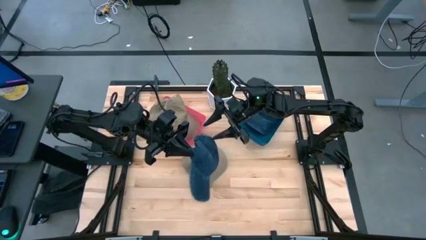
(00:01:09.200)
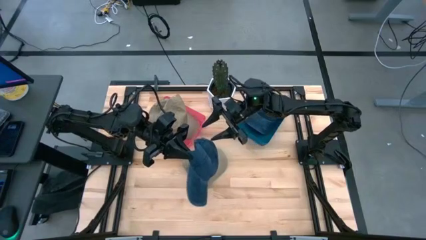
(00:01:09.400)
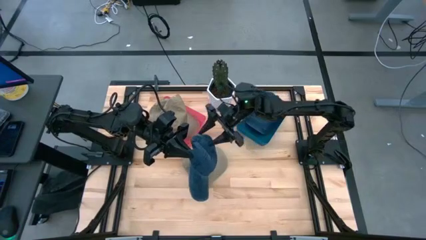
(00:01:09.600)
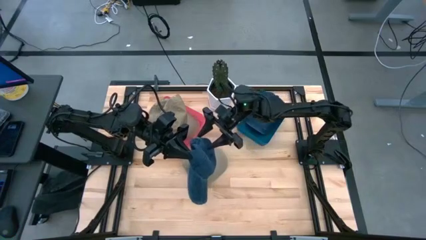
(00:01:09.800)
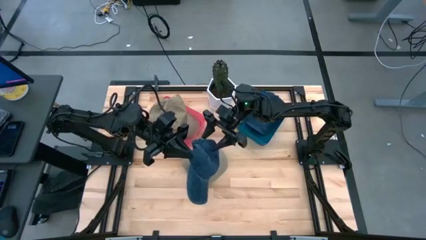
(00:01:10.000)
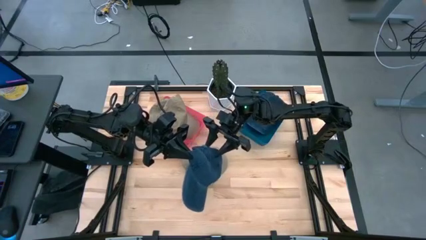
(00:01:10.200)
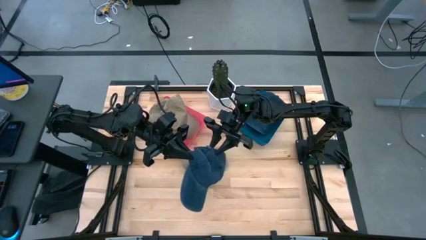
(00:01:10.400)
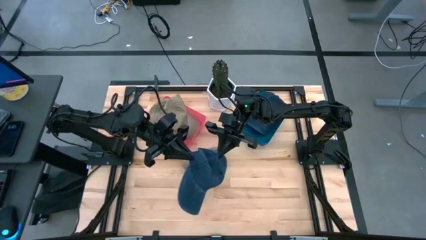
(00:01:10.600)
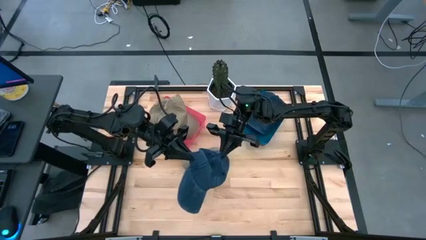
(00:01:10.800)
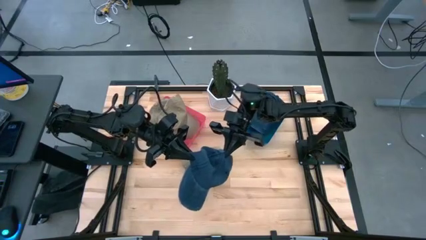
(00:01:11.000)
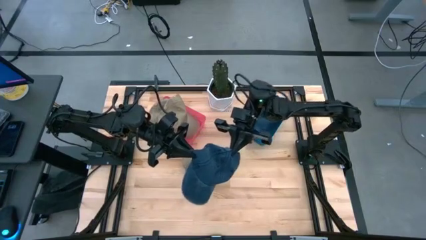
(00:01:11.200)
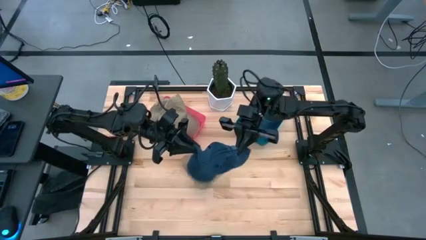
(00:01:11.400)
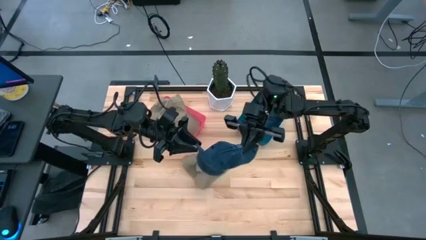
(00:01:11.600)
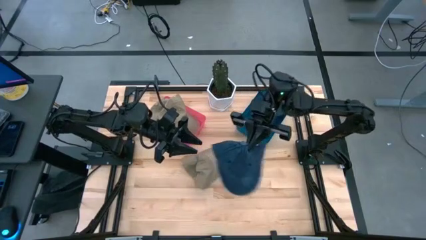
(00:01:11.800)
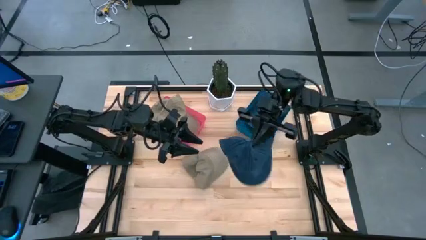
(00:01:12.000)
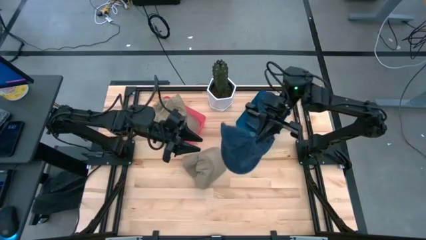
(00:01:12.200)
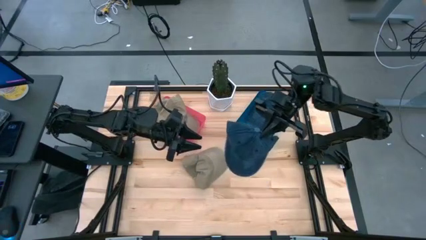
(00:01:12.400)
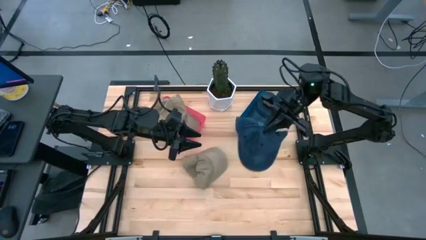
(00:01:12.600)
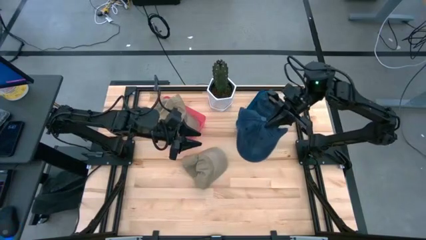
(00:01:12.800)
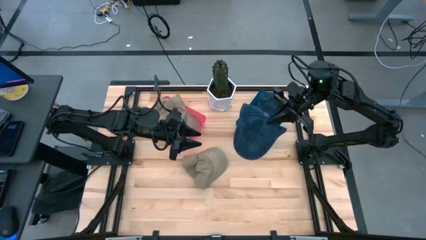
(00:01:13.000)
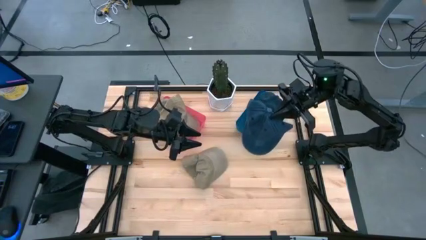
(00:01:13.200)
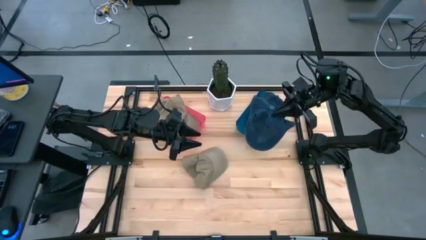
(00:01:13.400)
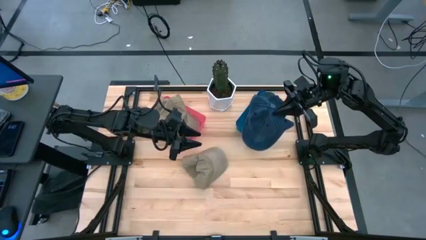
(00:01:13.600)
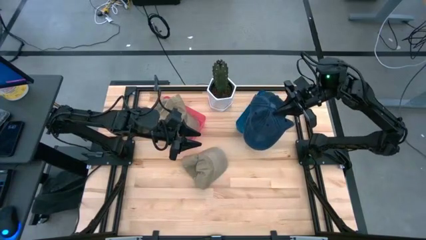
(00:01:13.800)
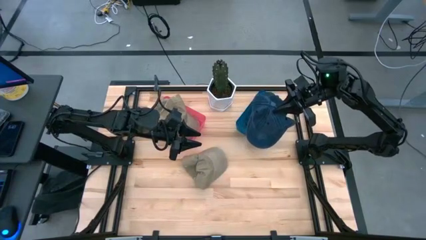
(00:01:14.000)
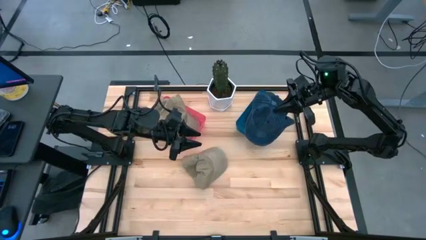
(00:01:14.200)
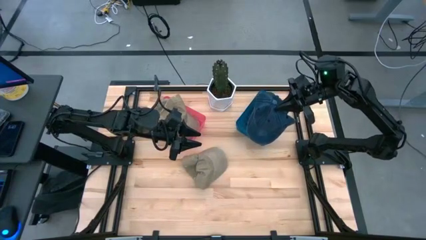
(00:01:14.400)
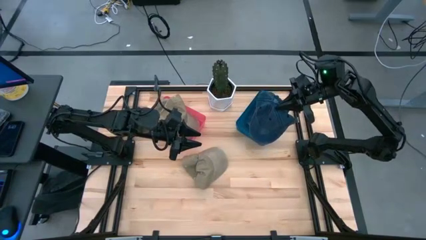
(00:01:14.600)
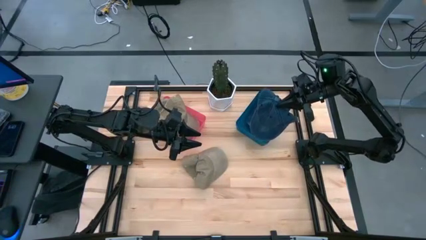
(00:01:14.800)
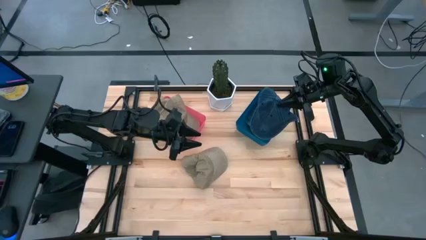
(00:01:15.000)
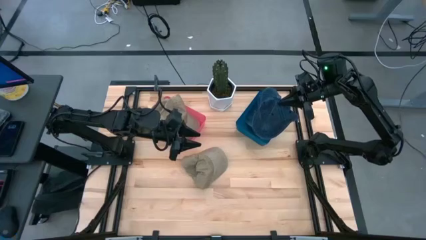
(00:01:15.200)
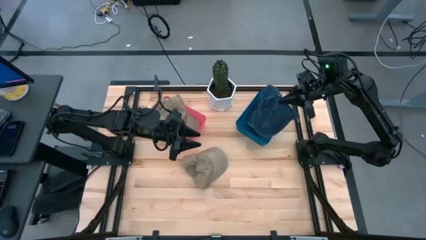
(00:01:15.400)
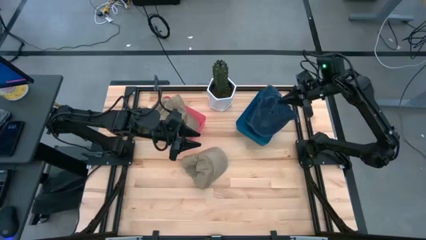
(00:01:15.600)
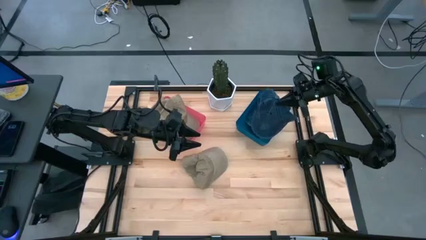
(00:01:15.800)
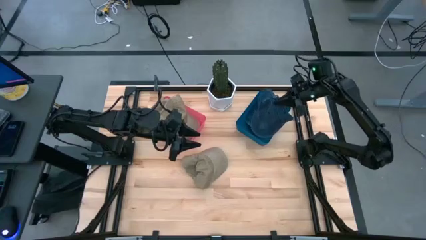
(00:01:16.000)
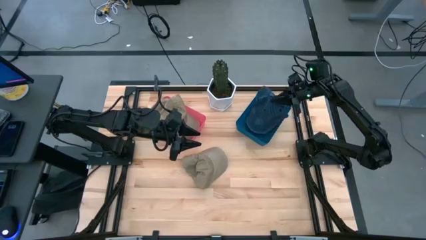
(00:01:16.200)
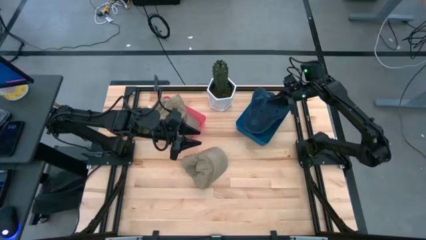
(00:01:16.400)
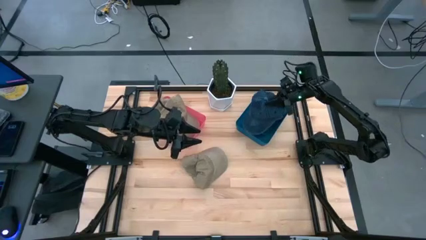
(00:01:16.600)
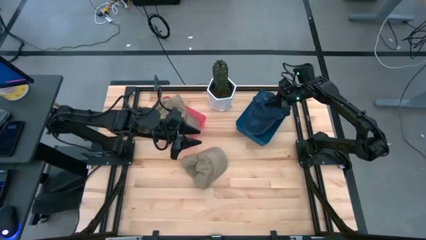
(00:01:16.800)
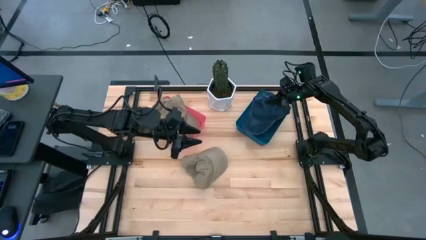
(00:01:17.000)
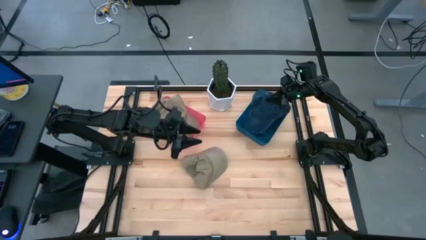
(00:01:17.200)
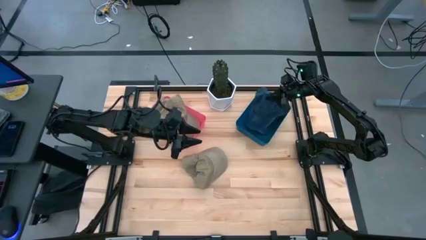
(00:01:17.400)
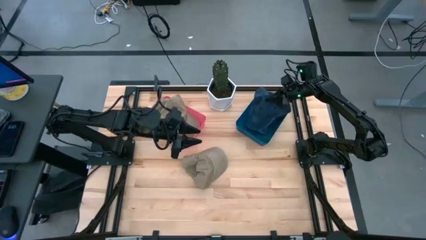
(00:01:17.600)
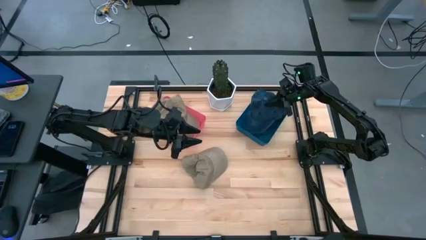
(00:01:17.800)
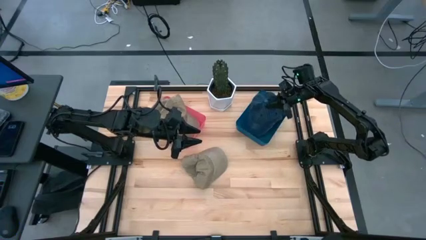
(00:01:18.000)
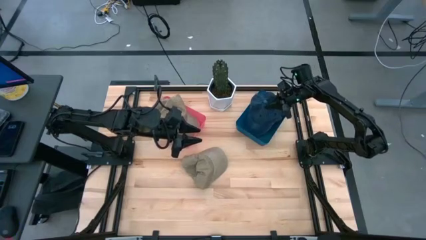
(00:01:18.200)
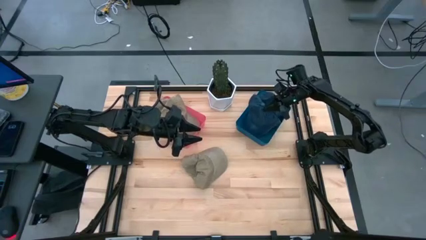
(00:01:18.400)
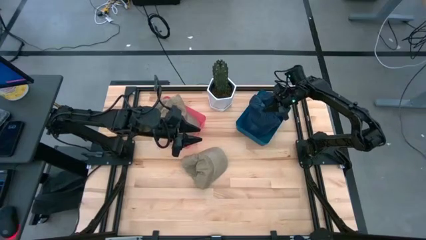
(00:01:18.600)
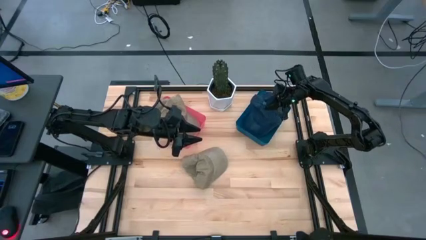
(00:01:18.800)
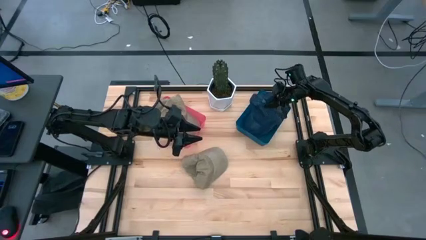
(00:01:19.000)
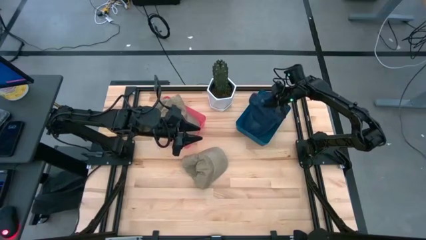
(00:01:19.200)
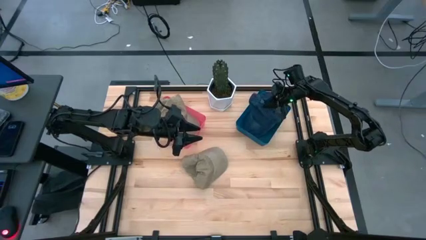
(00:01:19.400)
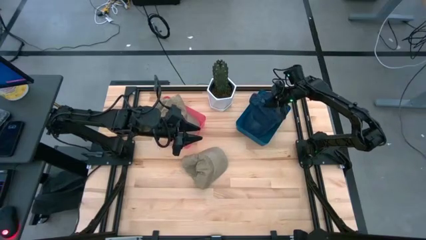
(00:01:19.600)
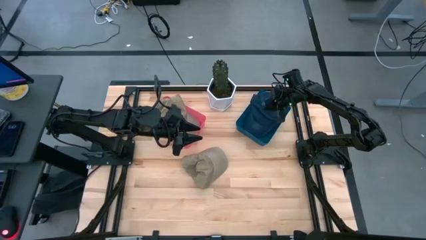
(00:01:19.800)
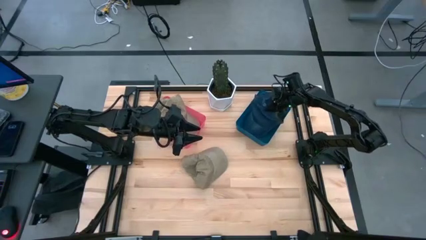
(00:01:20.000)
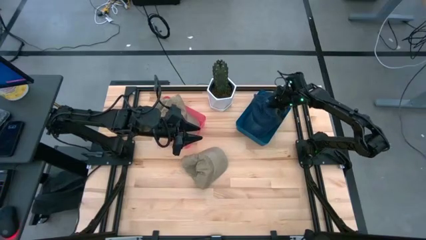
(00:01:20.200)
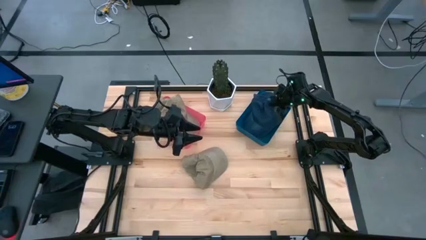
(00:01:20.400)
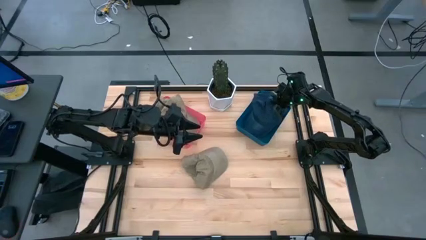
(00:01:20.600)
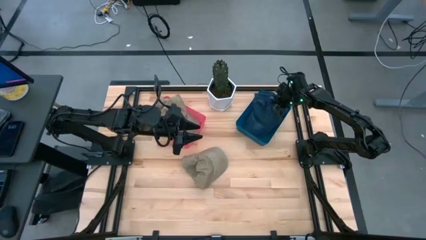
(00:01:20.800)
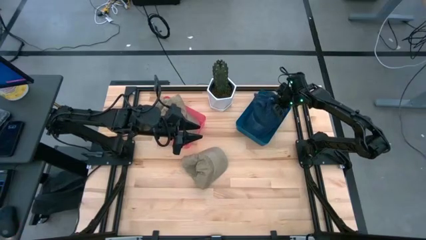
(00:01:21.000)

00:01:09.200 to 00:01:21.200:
Task: Pick & Place hat
Put the blue cap into the blue bin
